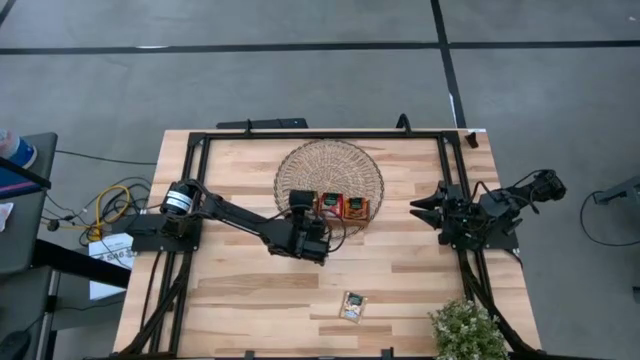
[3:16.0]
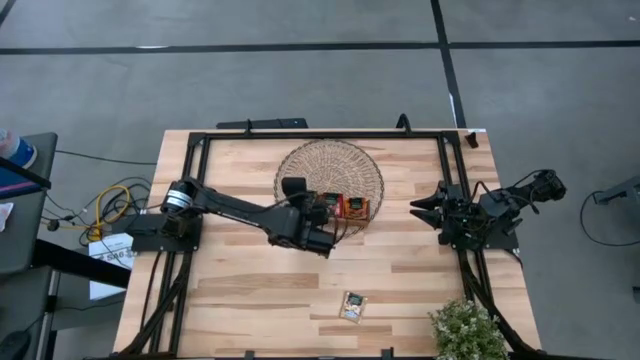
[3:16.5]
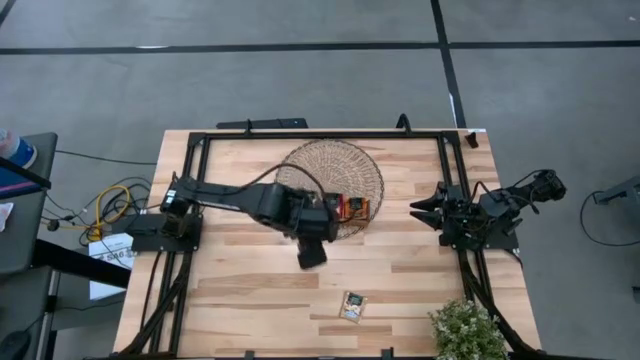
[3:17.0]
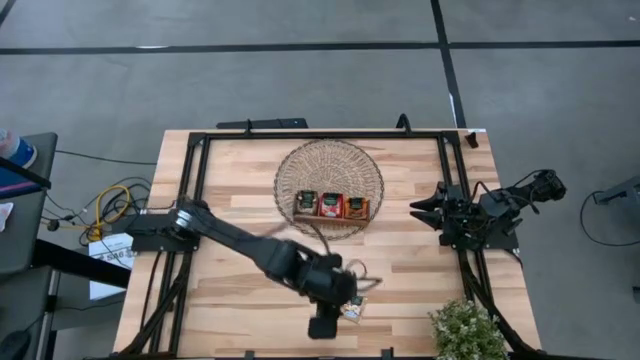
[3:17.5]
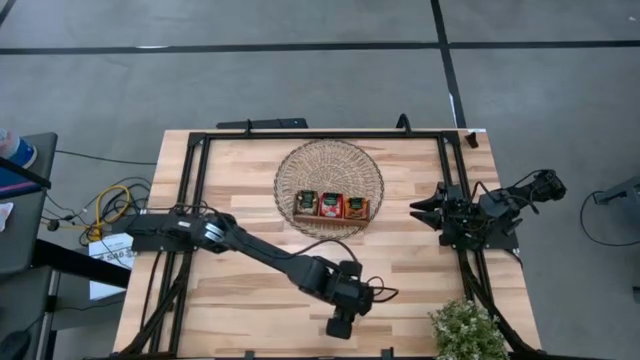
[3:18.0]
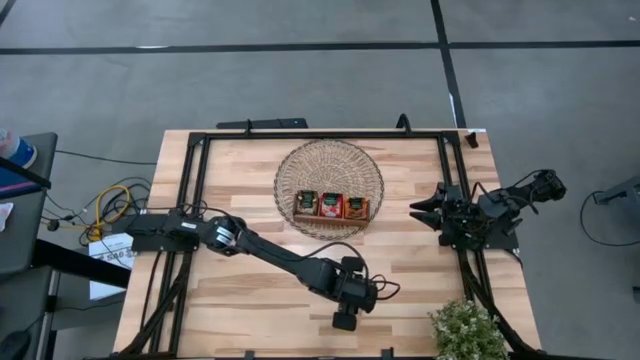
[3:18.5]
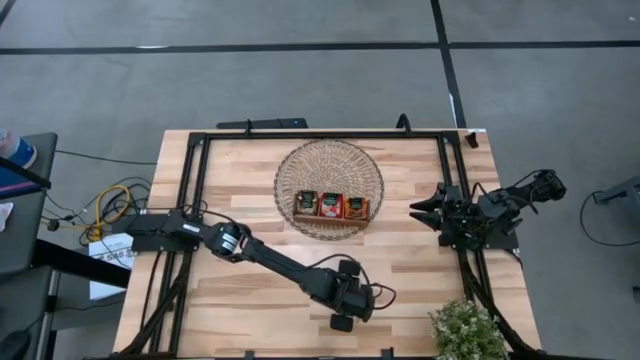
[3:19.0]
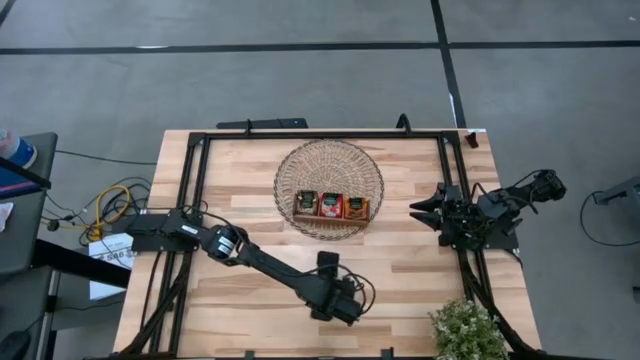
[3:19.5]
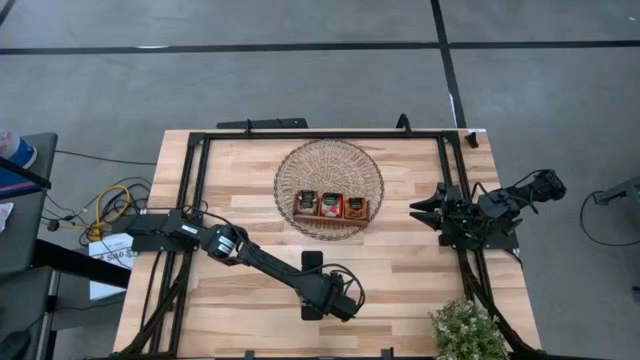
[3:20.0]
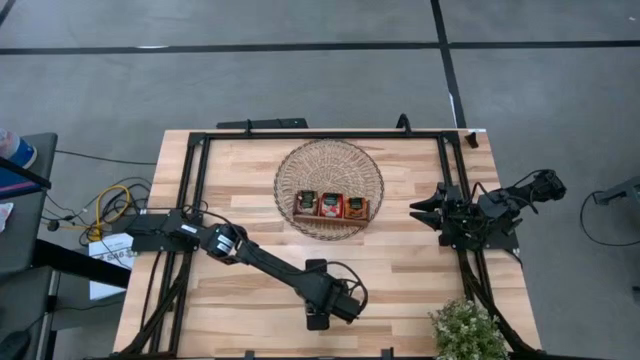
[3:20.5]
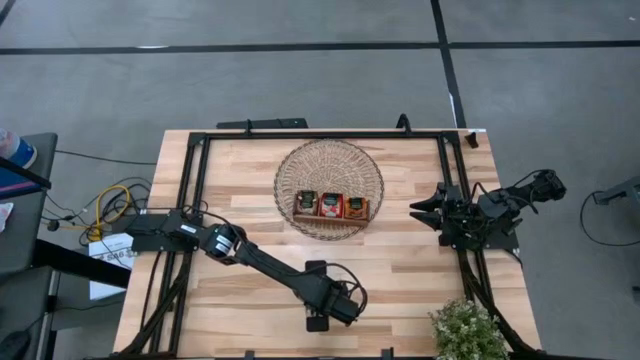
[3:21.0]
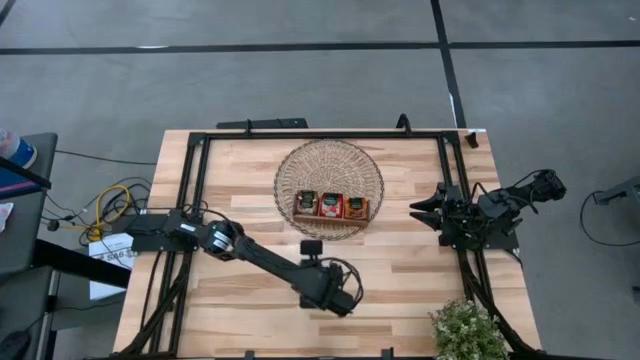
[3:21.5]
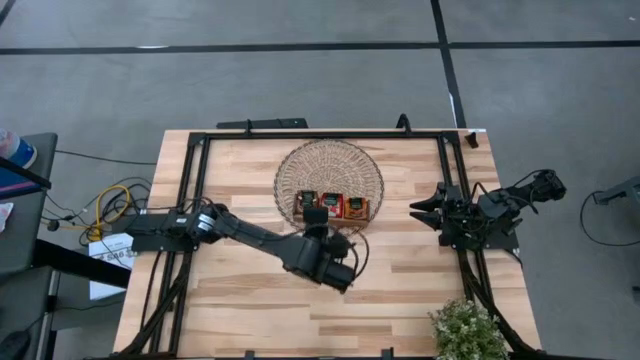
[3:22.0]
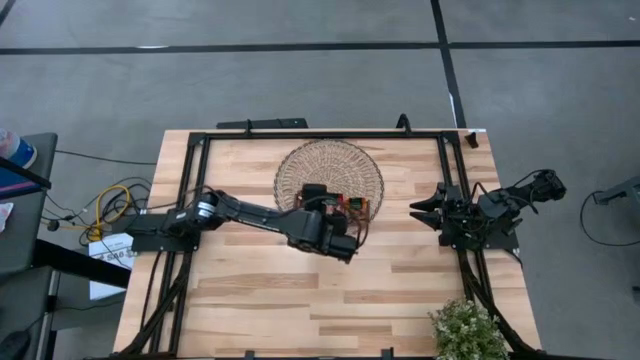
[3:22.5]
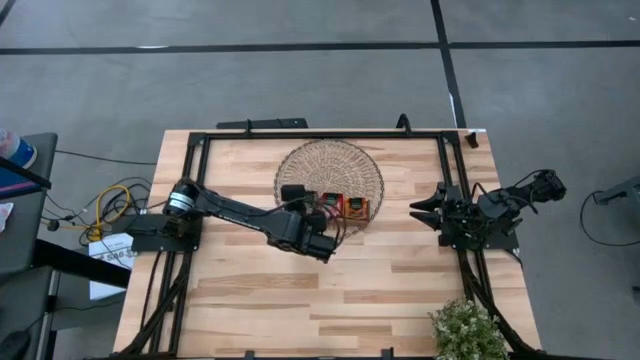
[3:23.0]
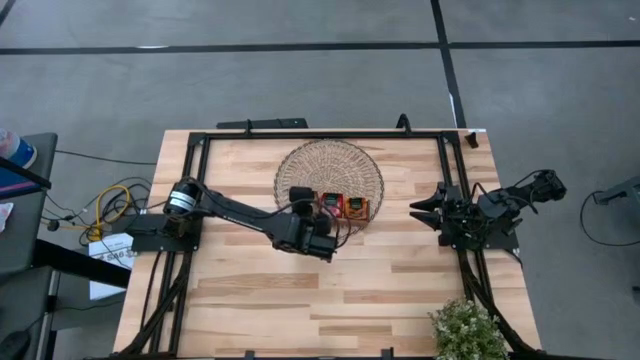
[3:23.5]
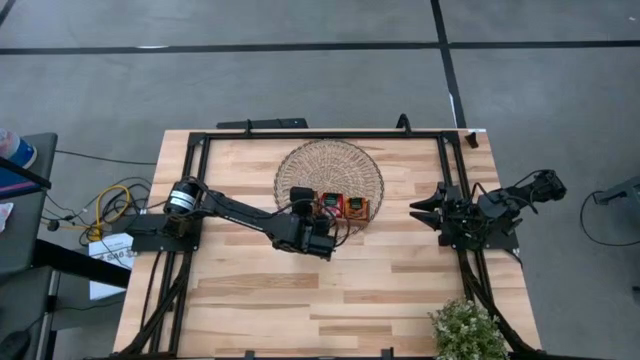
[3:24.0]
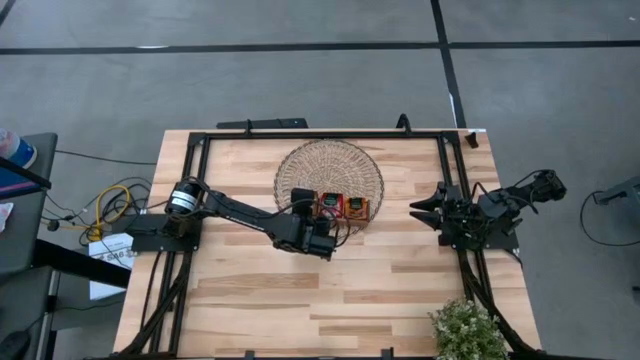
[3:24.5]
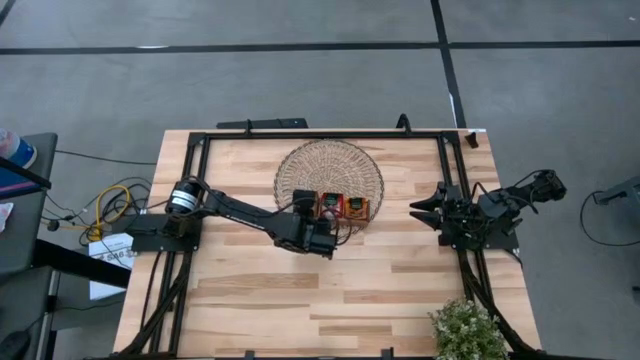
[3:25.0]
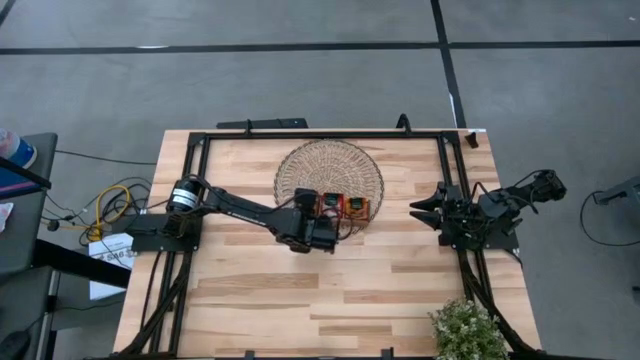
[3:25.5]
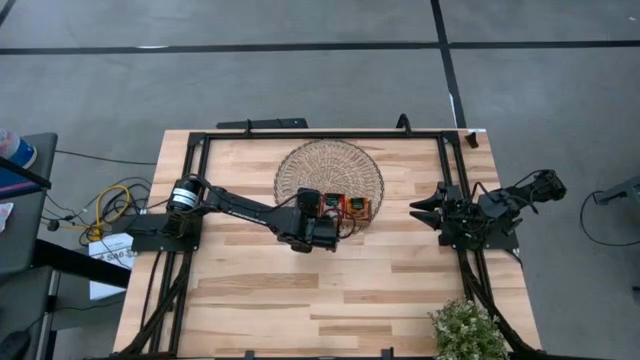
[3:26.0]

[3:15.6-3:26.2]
Task: Pick & Place Tea
Put the brown tea bag into the left section of the wooden organizer

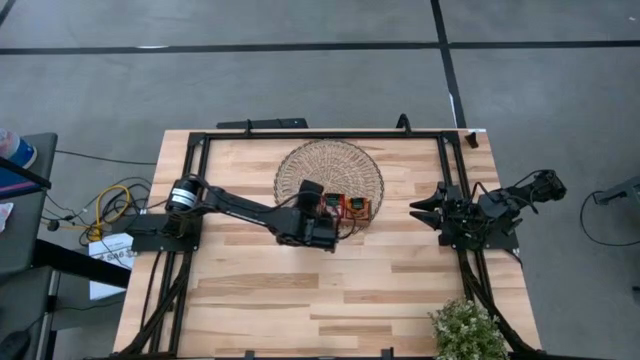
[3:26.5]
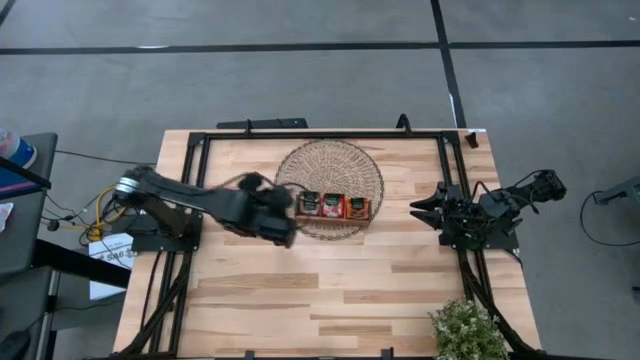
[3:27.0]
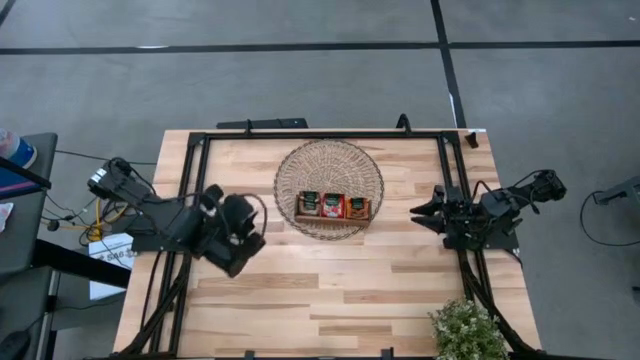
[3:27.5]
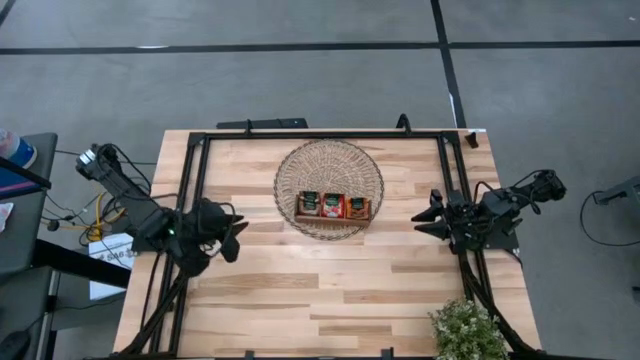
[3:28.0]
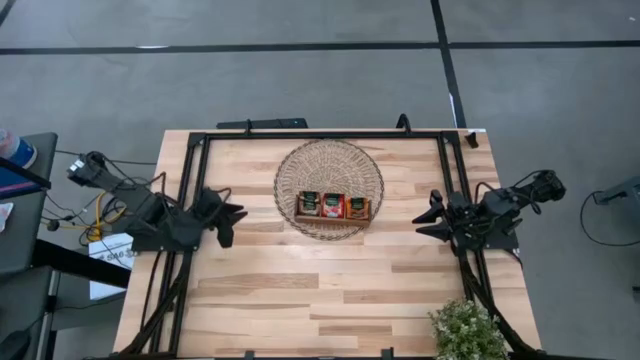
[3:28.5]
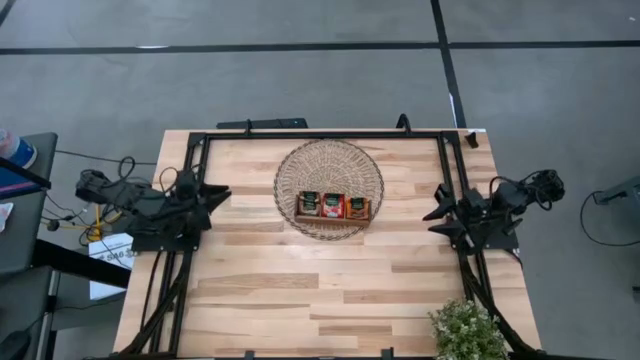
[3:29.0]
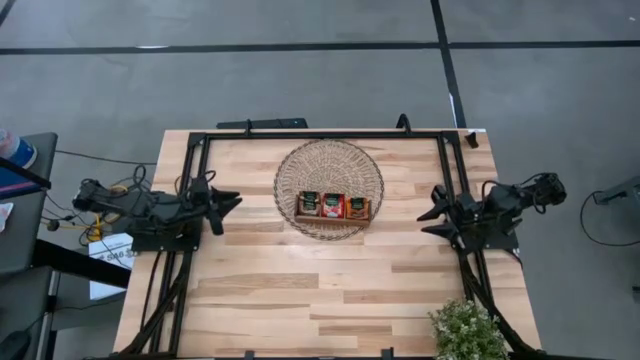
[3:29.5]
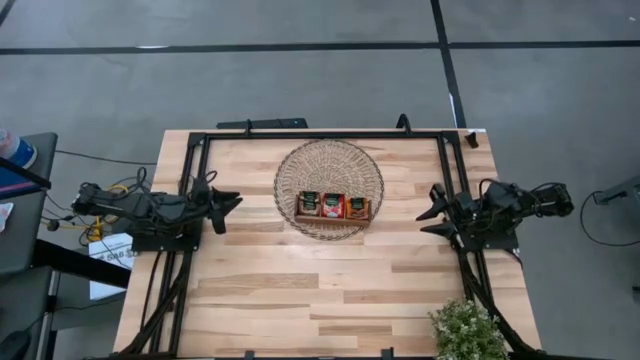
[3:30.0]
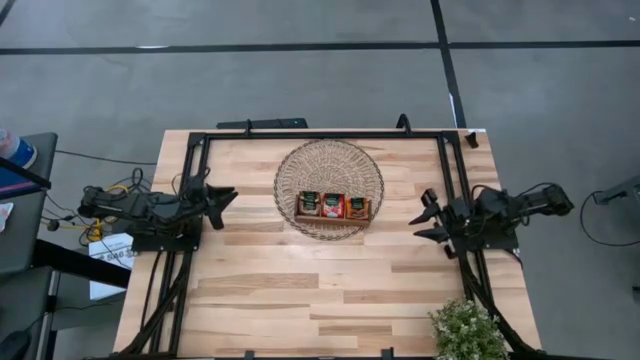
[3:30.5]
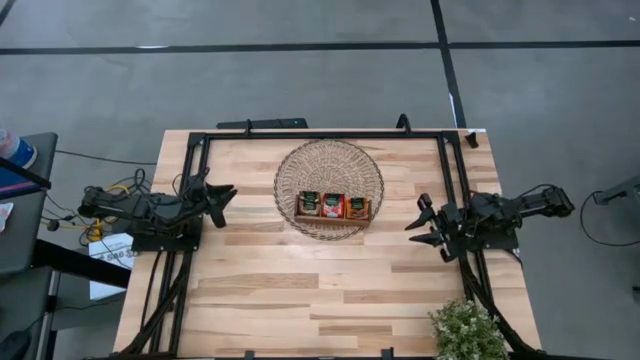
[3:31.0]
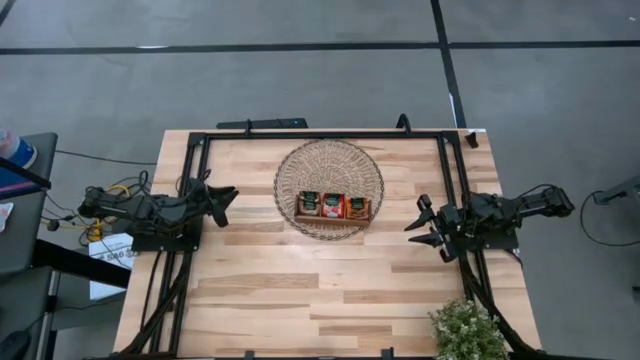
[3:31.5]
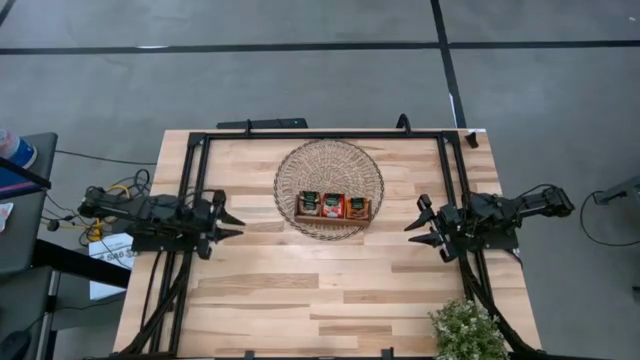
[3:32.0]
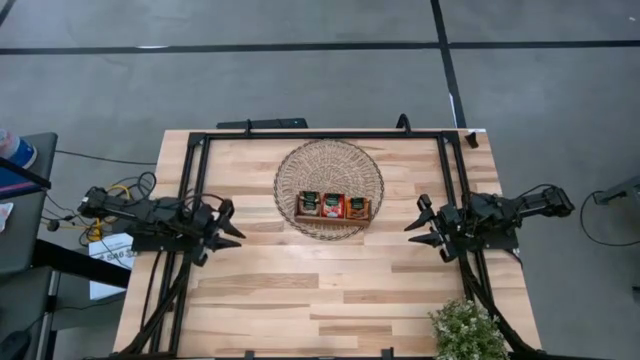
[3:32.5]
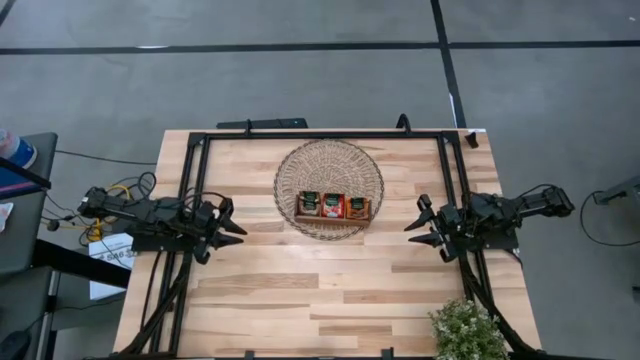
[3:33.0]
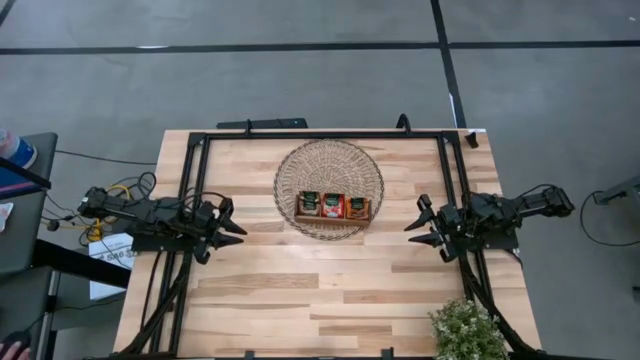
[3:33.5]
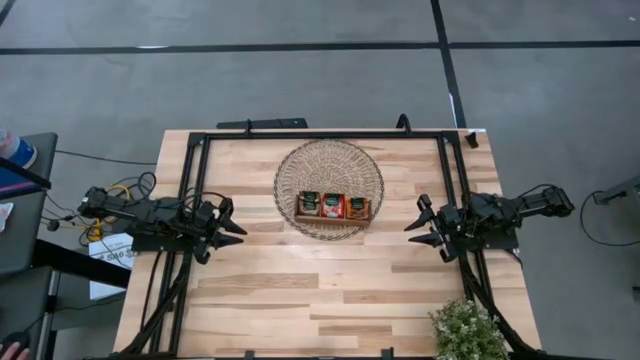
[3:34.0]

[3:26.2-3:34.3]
Return to Home Position

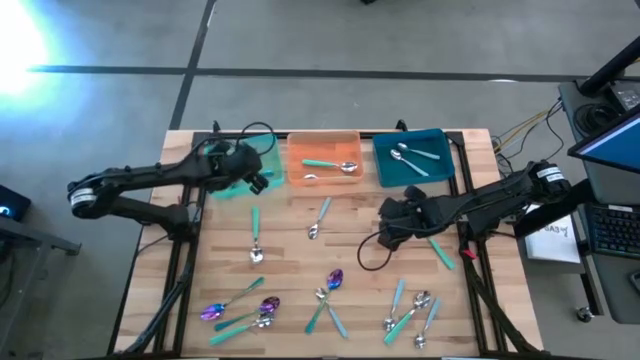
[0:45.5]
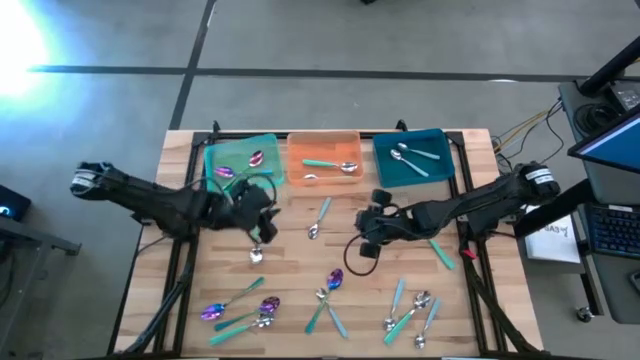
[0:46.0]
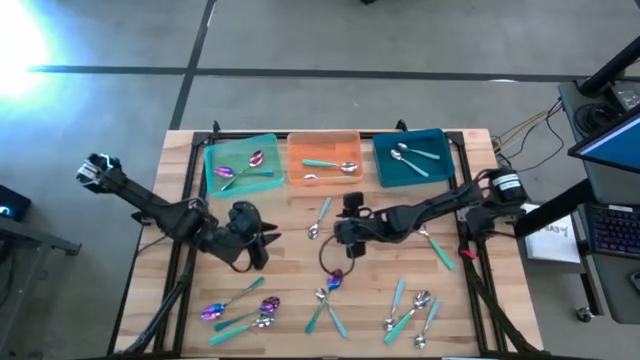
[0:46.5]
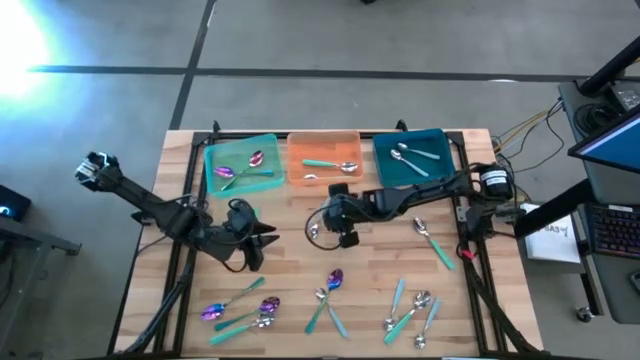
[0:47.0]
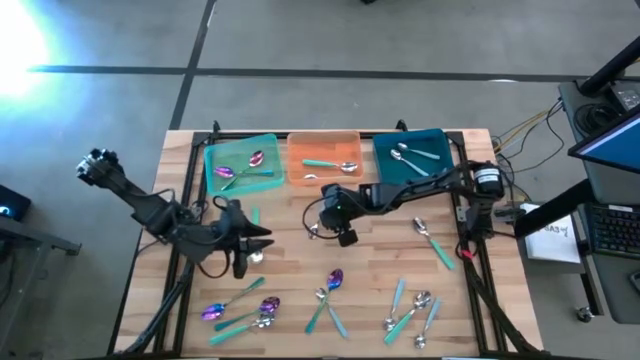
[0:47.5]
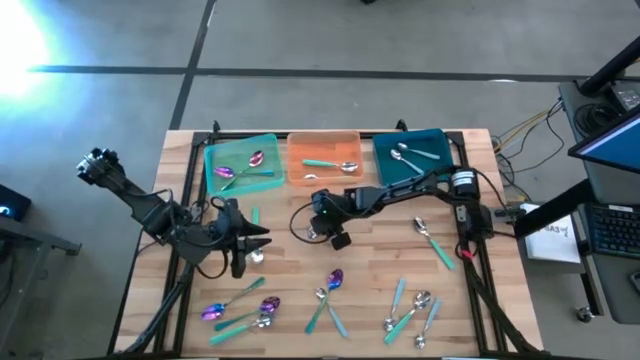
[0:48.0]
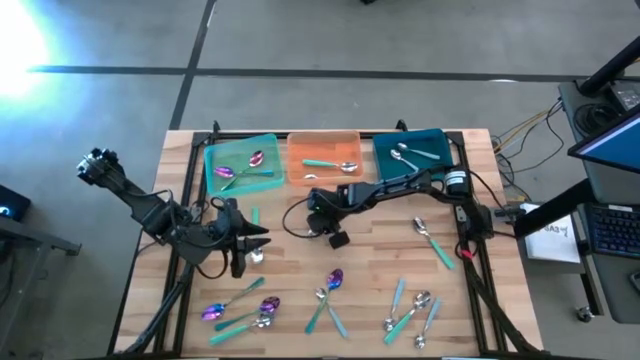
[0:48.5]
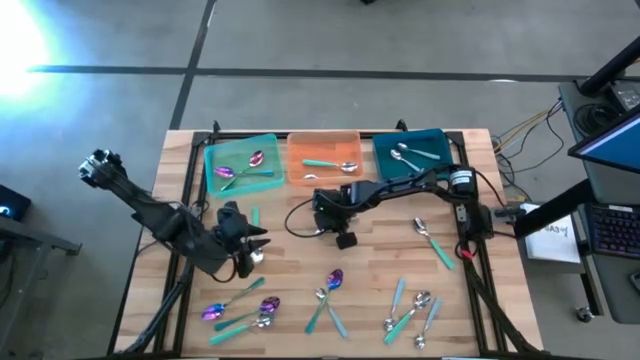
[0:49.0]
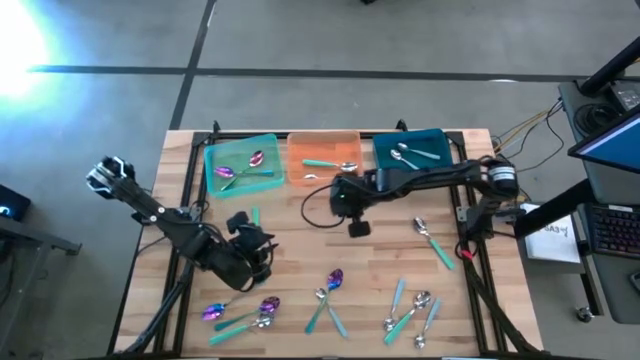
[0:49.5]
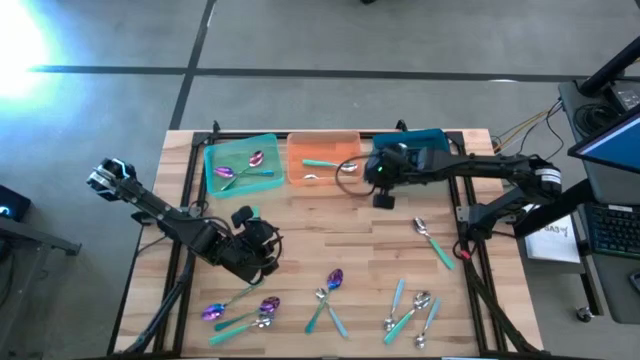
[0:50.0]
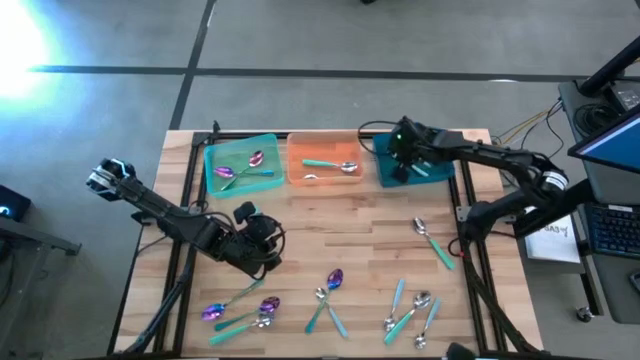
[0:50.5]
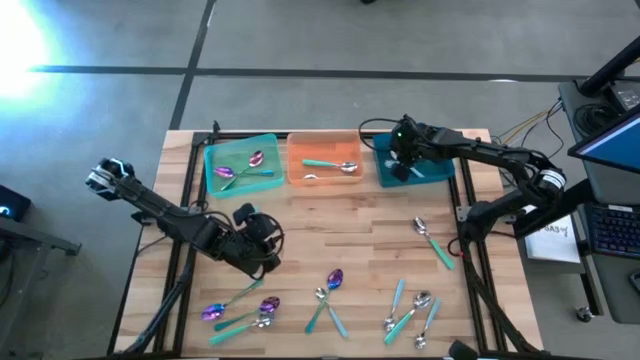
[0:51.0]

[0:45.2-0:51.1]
Task: Sort silverware by color (type)
Put the light blue spoon into the blue bin
